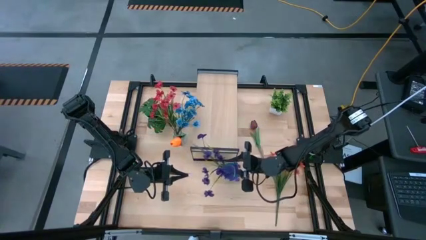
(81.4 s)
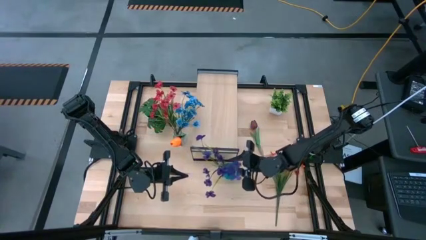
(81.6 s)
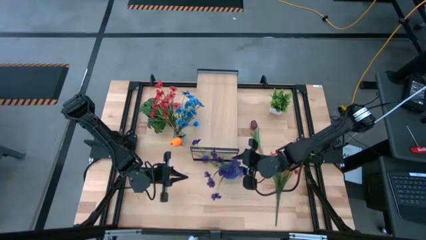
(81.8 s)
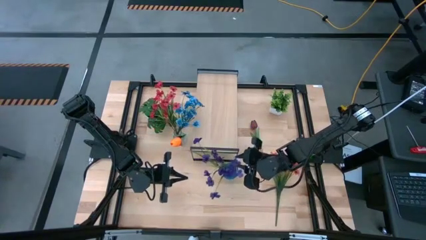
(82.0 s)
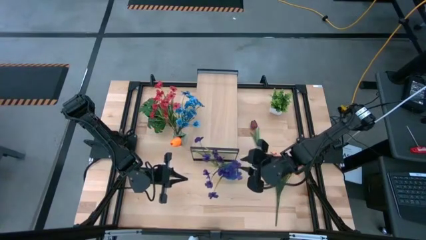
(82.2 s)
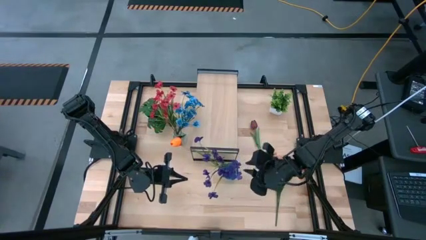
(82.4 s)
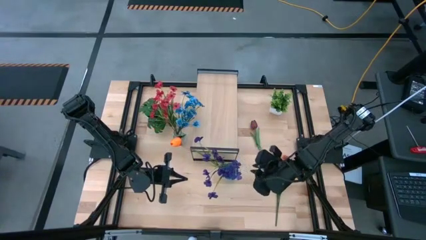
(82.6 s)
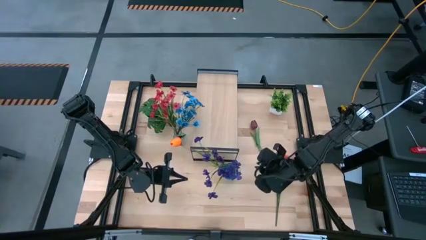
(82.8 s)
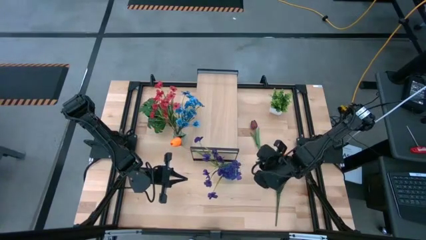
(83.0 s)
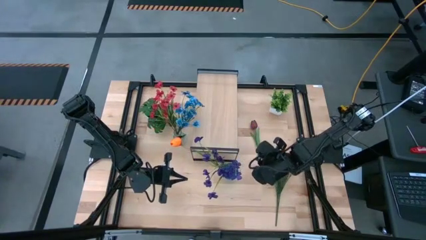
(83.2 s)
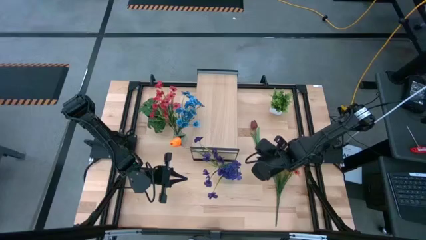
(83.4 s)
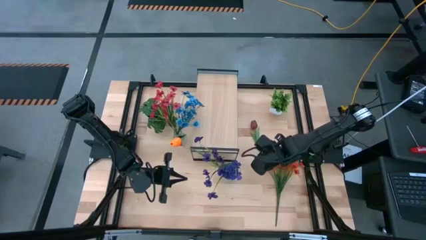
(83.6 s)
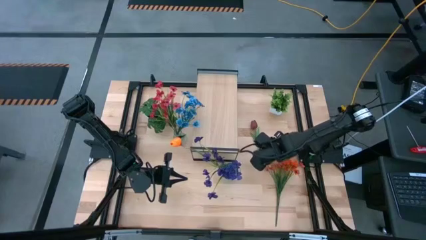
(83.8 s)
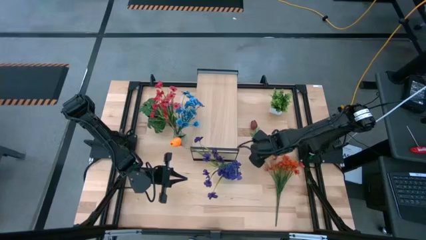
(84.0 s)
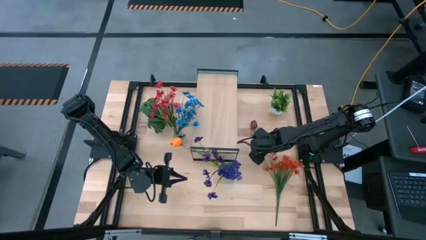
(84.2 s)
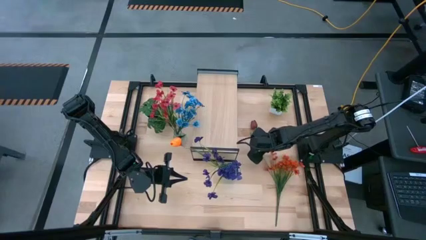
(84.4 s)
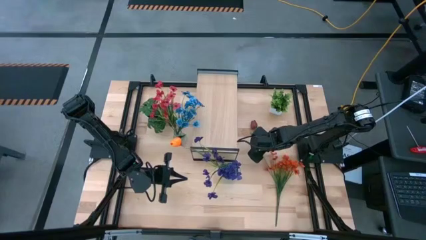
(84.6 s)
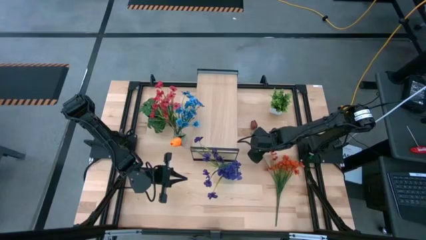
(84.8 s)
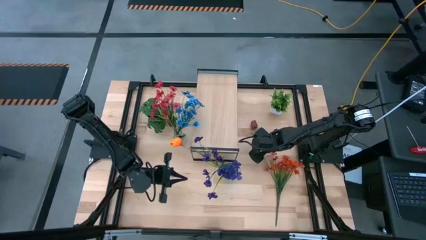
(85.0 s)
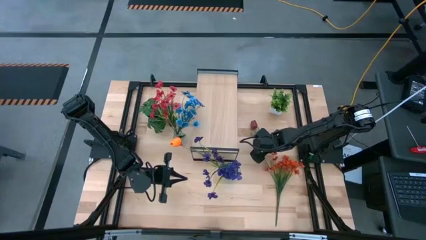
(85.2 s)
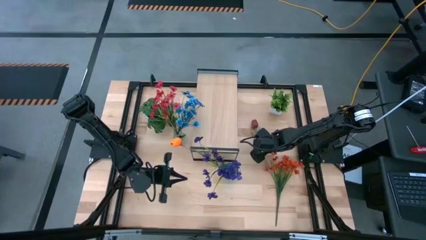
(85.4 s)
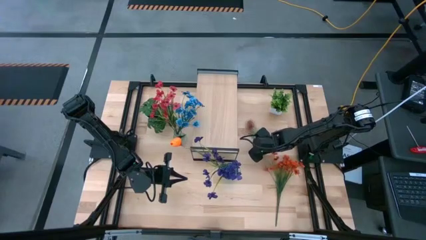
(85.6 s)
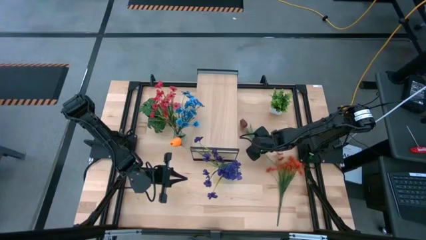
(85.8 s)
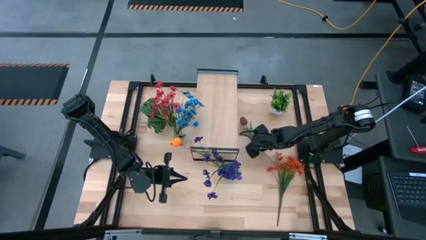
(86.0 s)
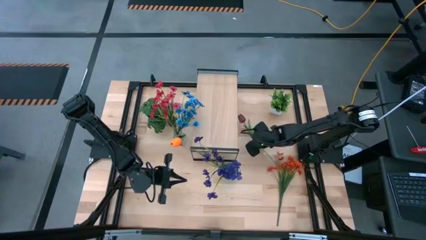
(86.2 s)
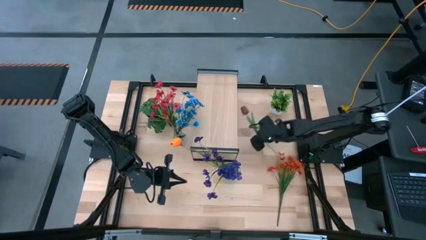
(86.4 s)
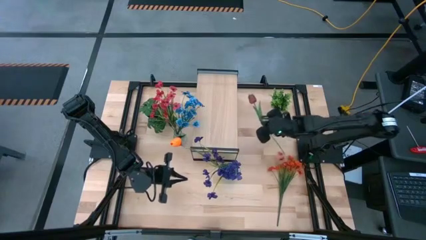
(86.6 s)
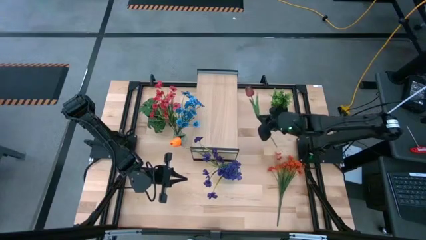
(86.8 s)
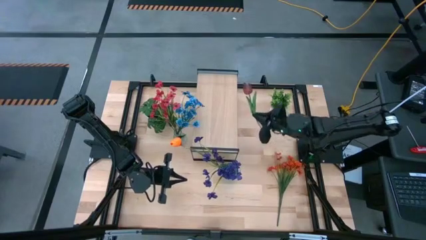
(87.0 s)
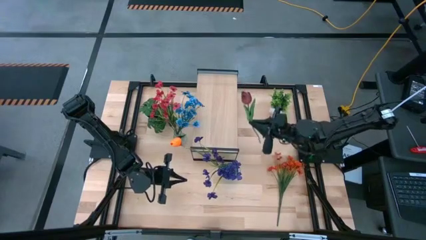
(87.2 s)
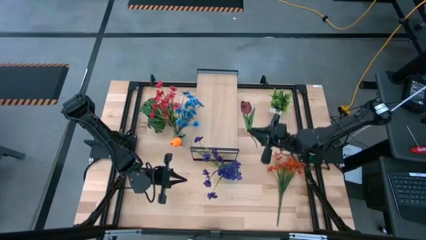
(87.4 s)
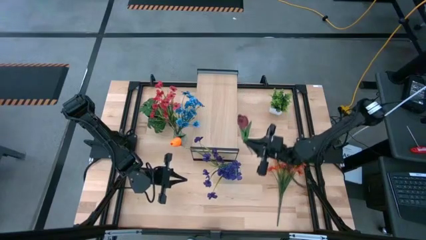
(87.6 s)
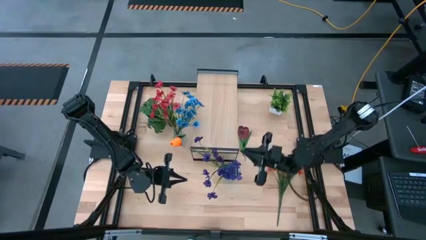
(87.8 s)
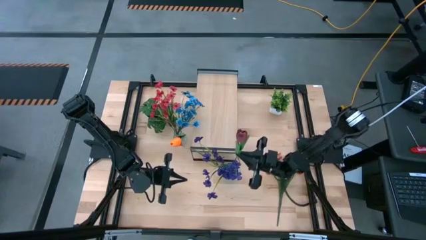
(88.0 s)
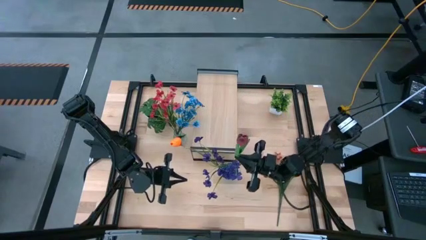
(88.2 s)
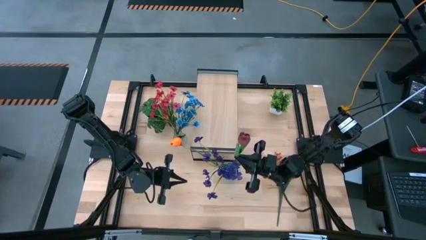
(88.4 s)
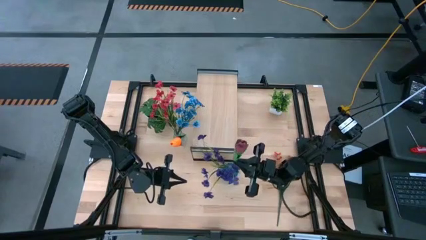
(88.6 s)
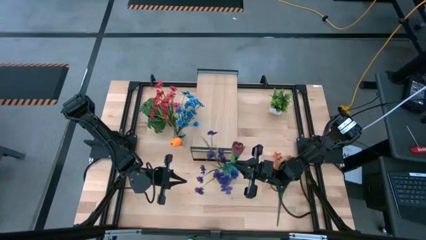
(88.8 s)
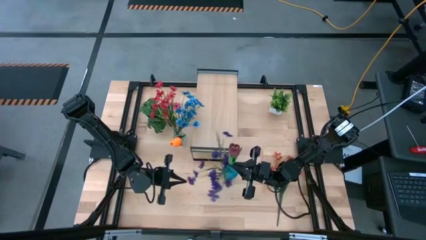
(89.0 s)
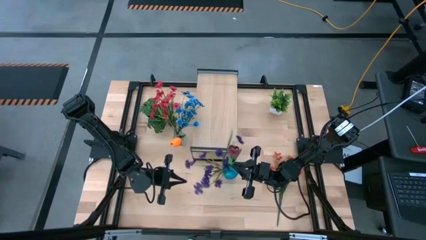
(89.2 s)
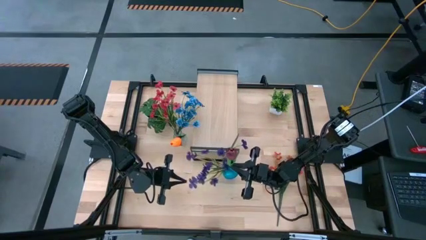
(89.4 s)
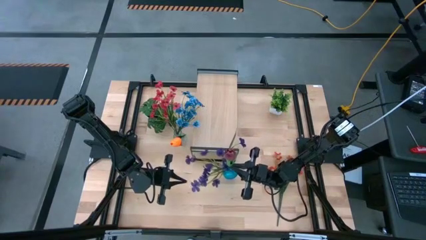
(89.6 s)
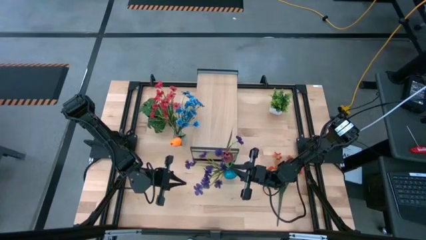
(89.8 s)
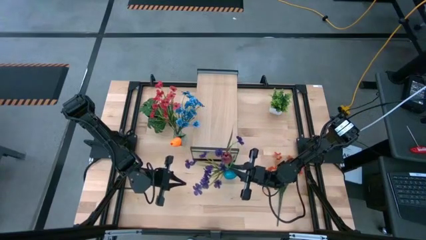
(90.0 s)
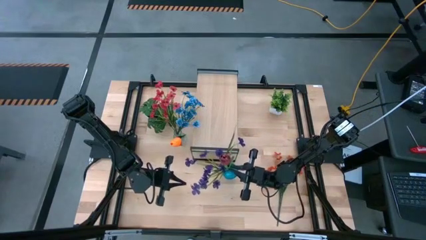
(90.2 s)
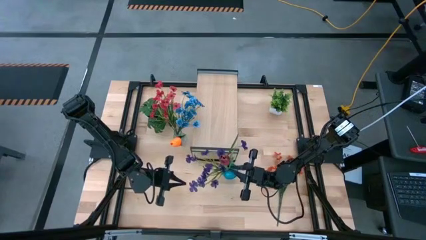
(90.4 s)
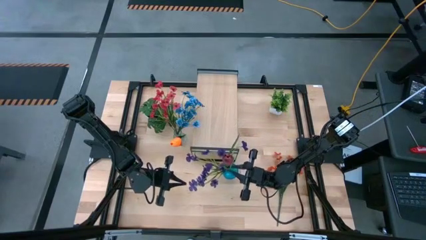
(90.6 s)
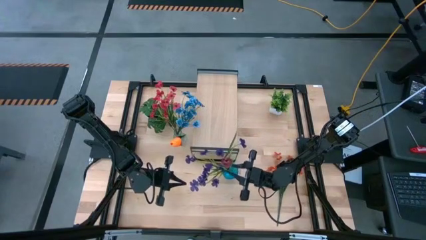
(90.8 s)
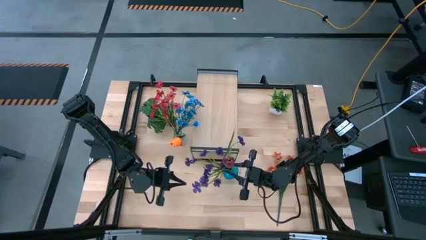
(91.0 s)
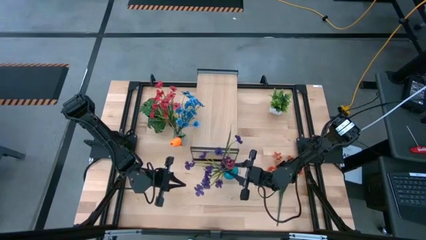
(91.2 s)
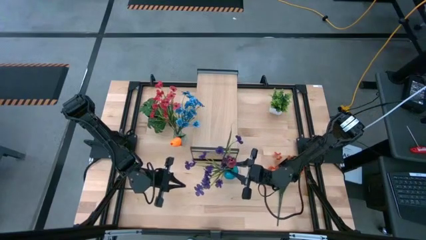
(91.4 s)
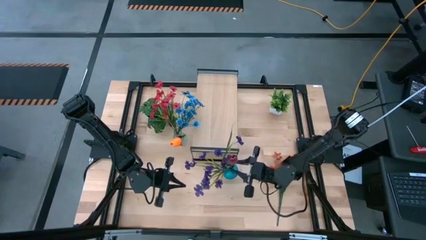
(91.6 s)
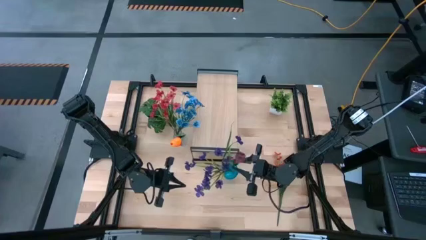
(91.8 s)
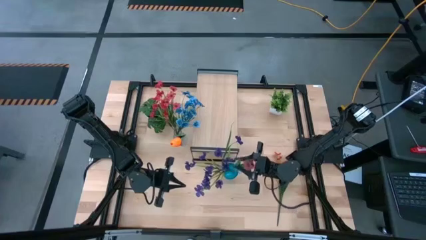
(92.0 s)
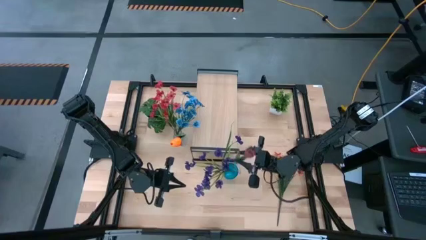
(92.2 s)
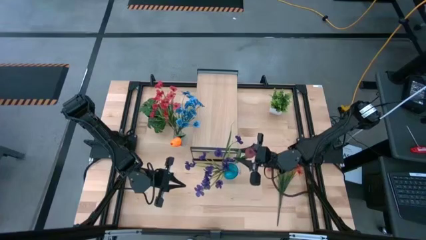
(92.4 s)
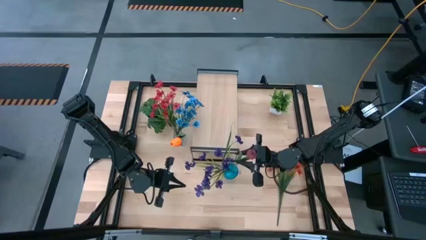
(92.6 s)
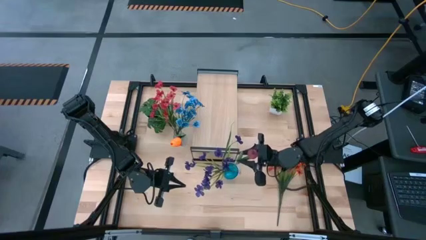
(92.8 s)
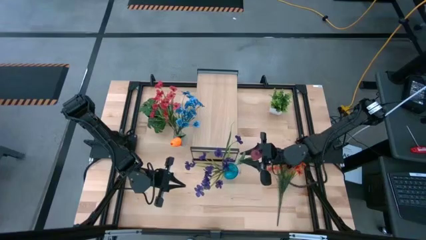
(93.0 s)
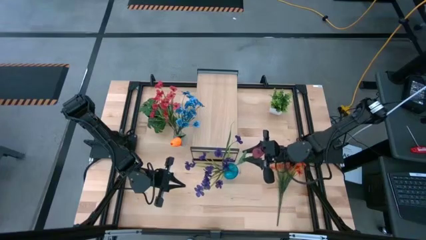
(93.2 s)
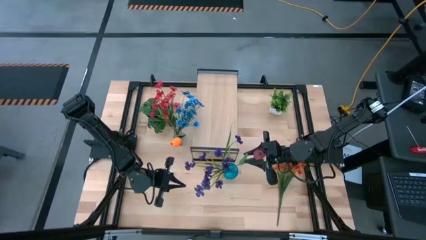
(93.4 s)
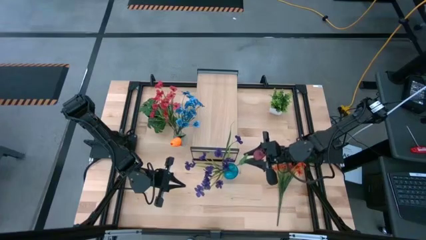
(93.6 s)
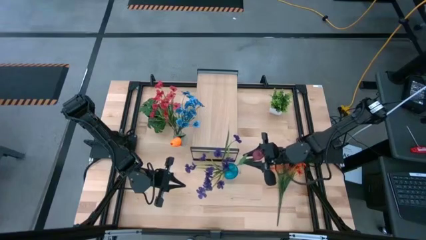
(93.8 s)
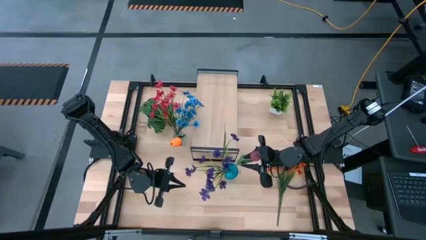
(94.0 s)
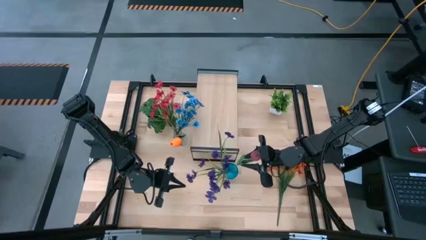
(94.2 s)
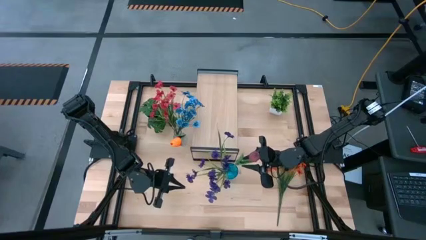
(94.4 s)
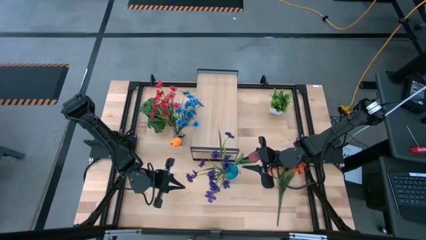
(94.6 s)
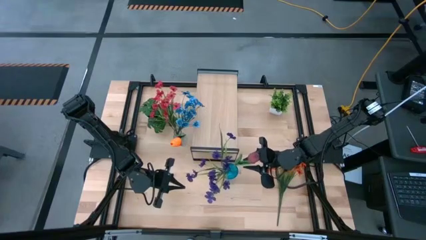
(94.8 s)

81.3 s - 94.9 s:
Task: Pick and place flowers into a vace then onto a shelf
Put the red tulip into the blue vase

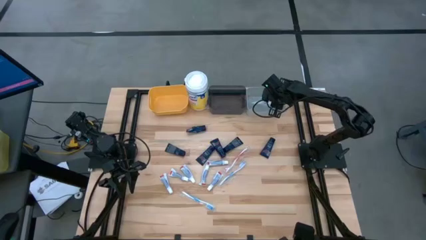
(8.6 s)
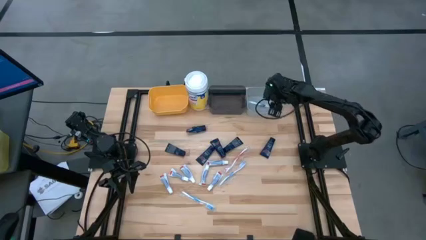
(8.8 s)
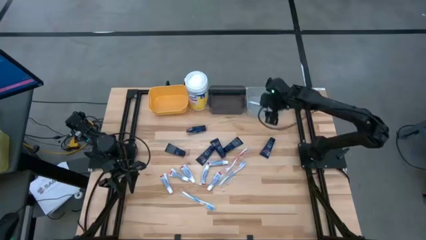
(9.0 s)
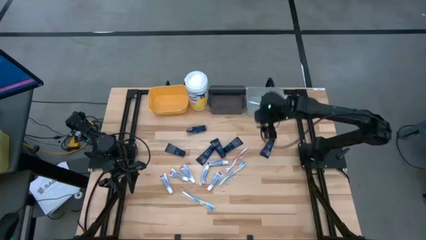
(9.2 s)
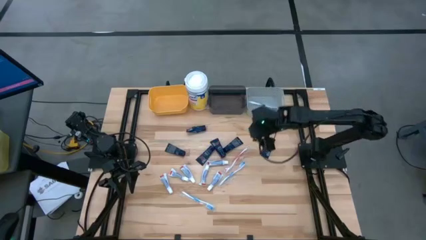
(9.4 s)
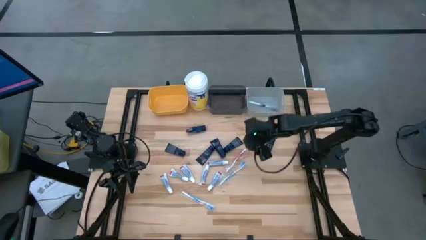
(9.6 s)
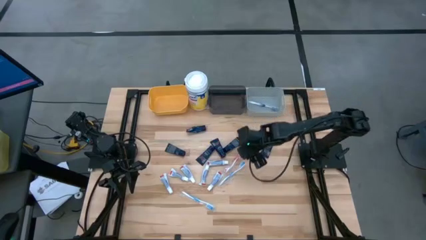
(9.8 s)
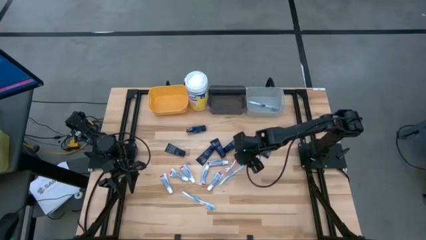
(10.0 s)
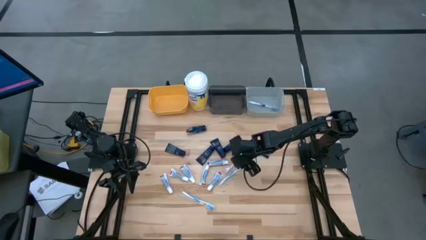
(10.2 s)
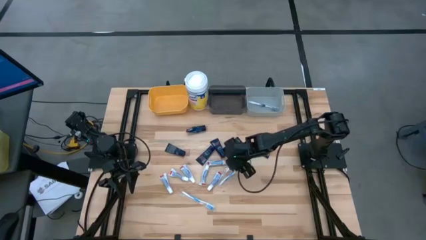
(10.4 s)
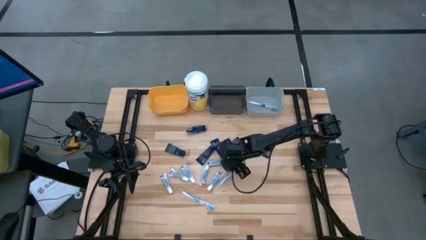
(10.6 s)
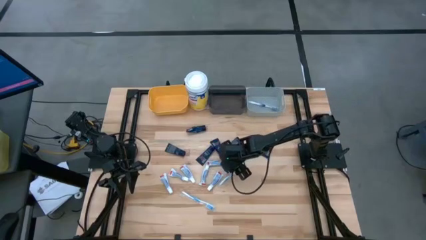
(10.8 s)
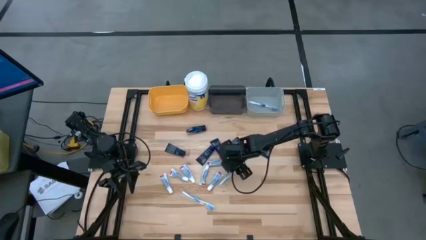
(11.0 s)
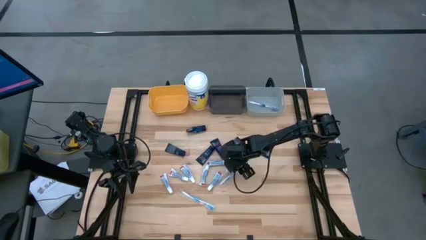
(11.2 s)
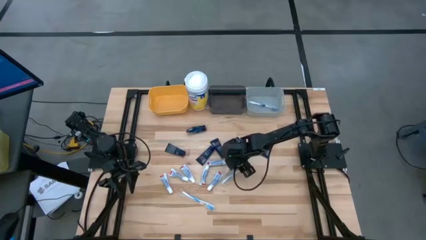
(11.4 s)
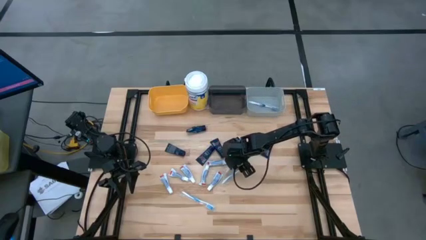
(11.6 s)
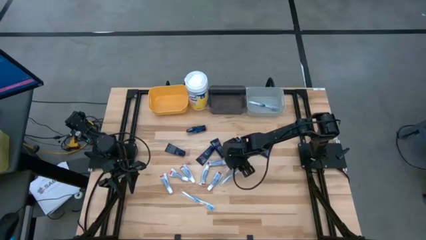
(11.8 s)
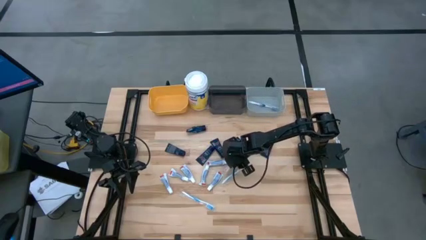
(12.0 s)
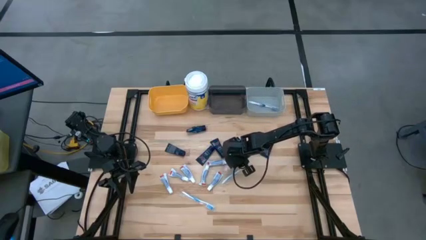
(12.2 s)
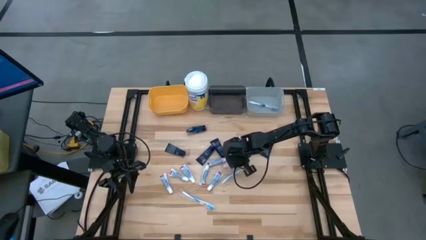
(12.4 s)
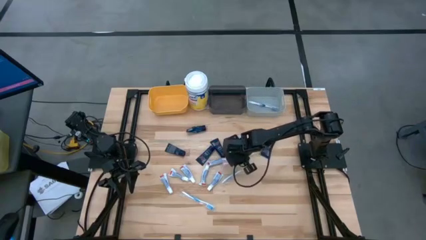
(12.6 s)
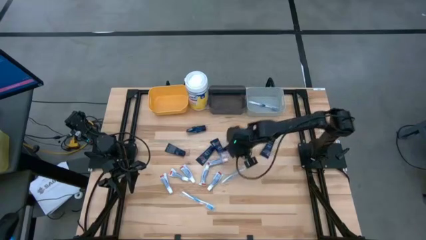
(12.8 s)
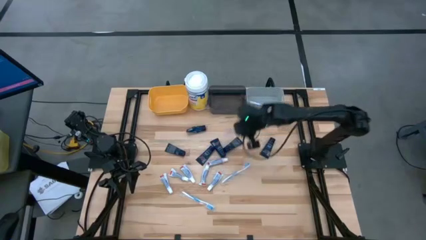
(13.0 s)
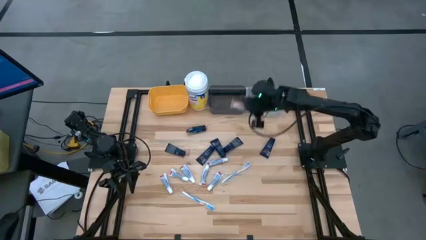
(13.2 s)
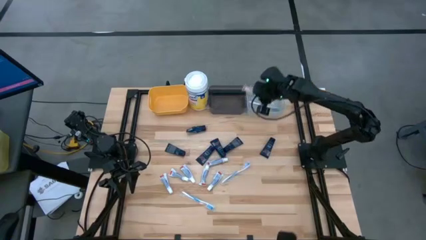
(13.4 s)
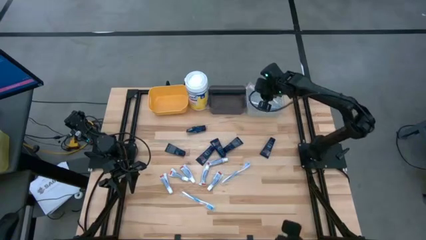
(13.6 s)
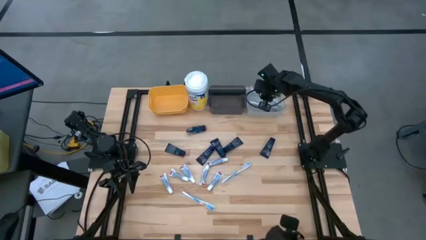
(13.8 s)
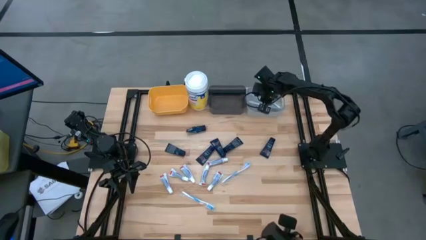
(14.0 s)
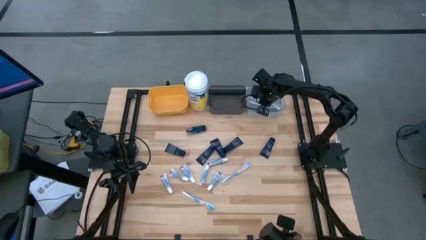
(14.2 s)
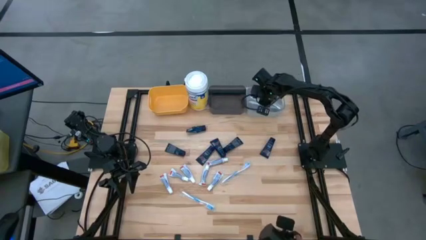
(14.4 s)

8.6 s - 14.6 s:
Task: Pick & Place Travel size toiletries
Put the orange toothbrush into the gray bin
